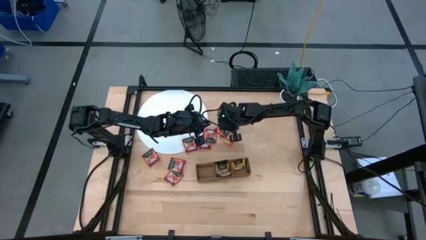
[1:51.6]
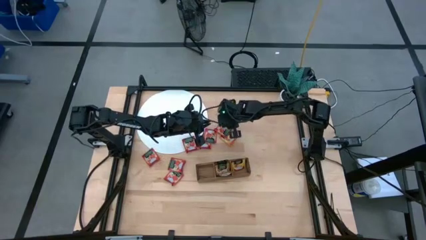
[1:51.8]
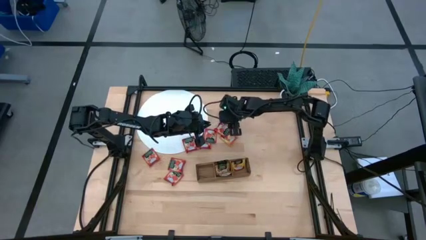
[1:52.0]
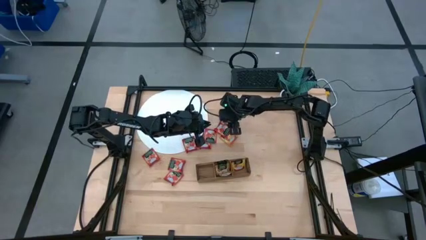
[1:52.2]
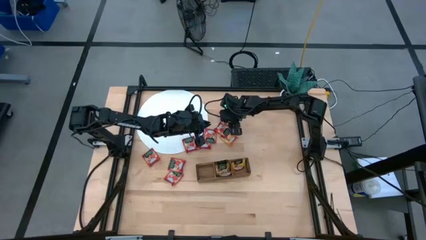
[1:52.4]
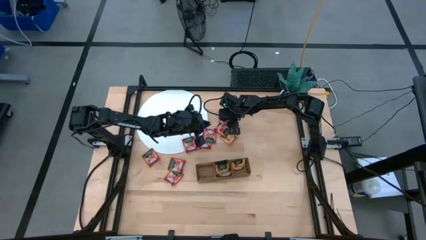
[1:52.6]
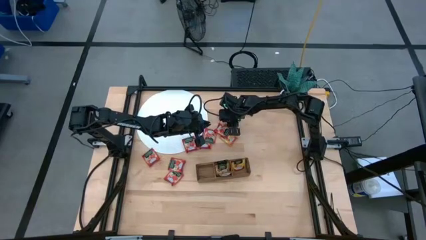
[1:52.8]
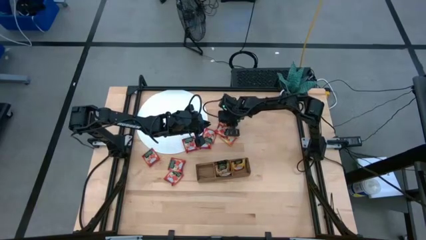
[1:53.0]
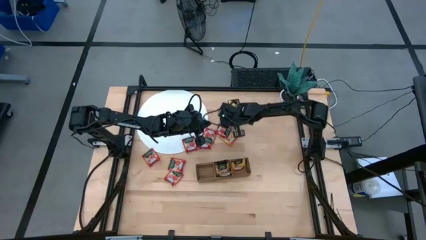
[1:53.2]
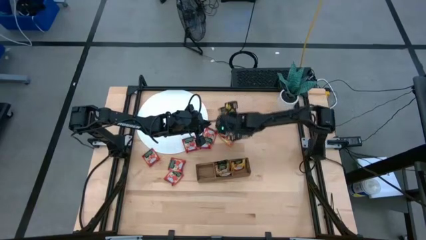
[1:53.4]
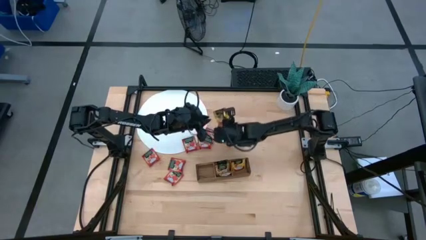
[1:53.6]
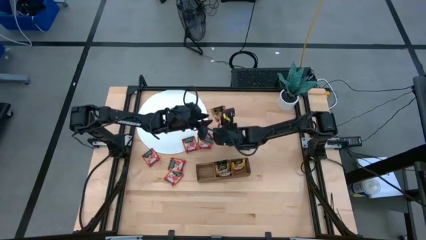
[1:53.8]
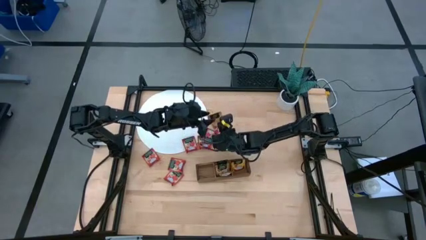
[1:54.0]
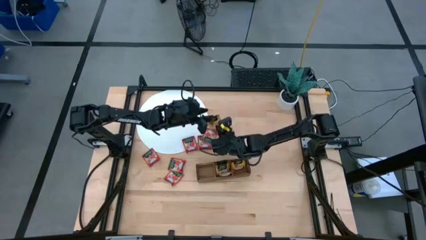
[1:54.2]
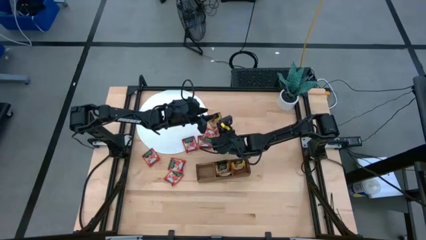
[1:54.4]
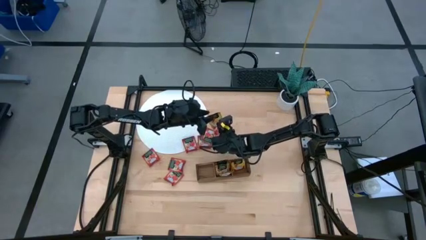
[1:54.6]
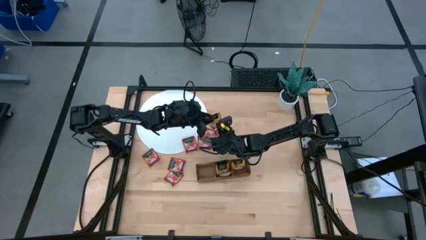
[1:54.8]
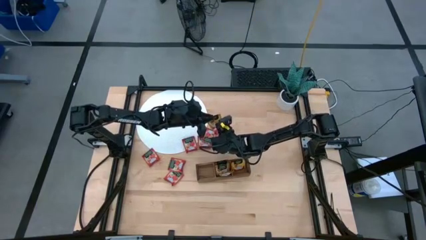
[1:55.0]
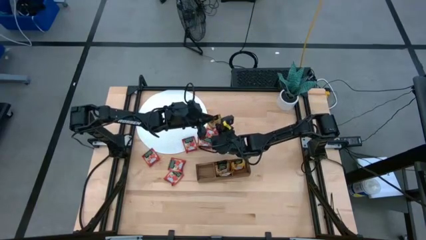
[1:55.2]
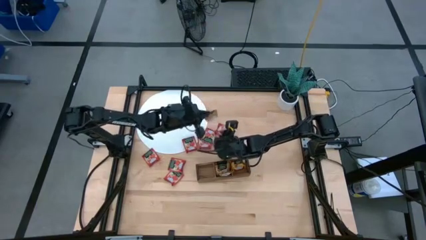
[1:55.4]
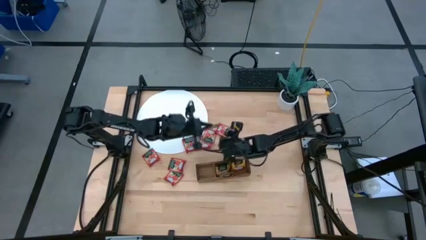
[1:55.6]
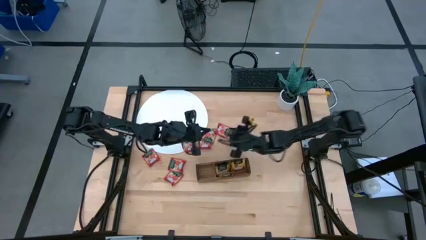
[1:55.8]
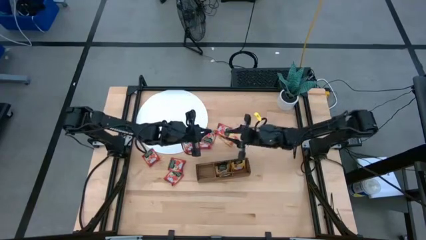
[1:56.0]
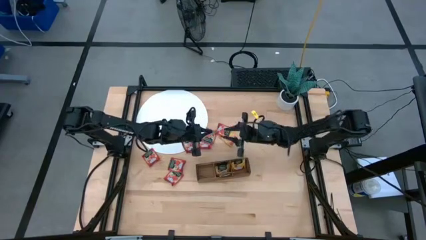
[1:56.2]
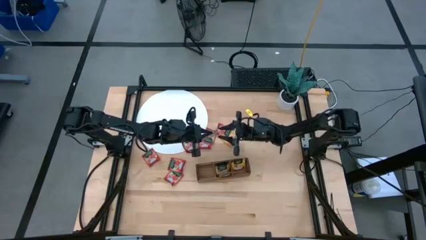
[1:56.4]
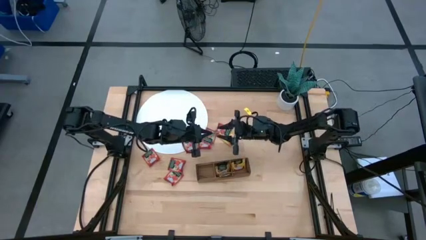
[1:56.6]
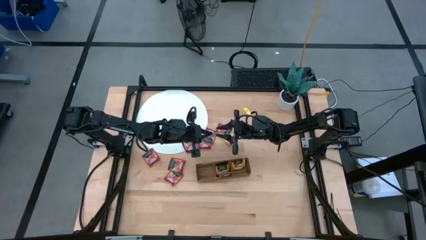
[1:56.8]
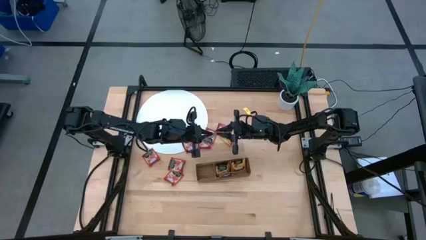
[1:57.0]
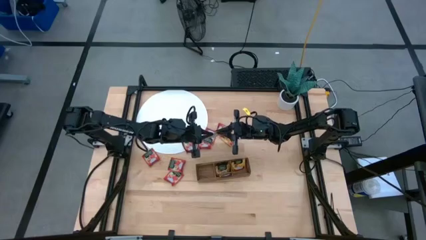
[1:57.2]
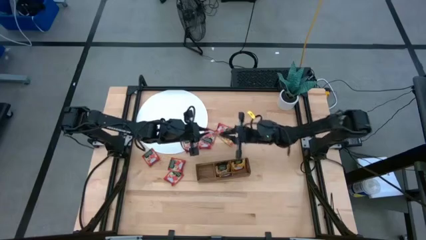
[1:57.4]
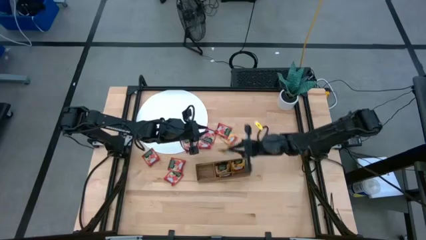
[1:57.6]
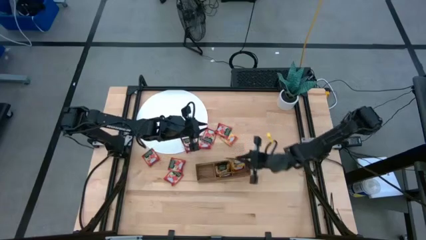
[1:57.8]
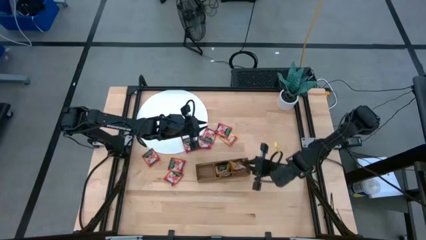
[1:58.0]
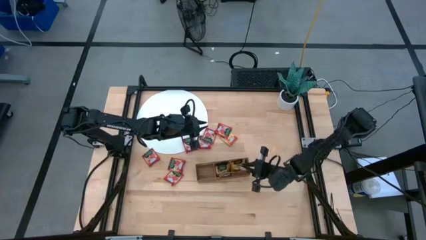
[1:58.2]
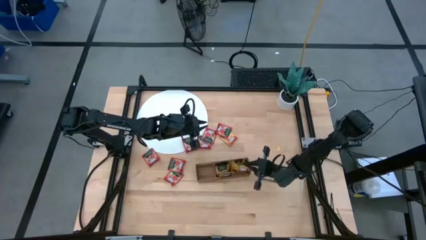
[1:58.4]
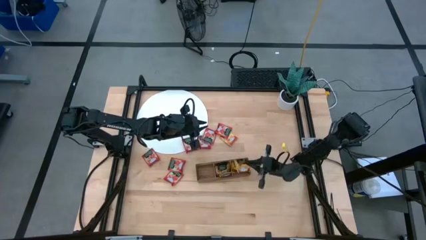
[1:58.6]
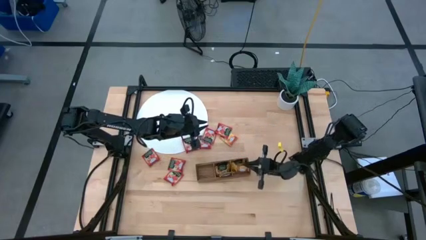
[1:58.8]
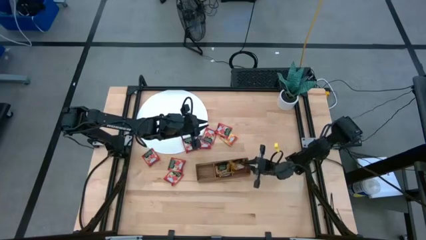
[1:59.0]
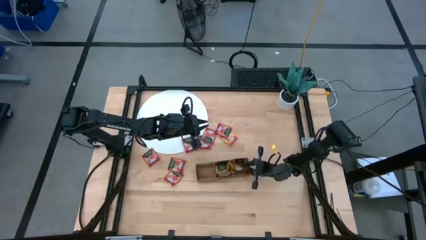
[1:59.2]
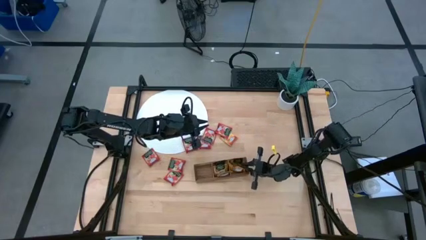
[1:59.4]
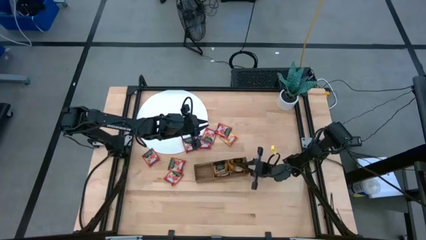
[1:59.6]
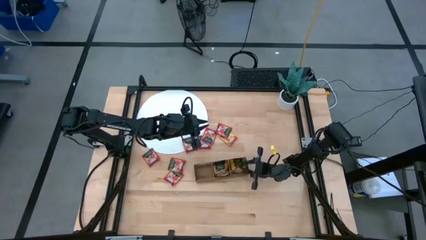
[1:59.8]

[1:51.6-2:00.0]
Task: Pick & Place Tea
Put the top yellow tea bag into the right section of the wooden organizer

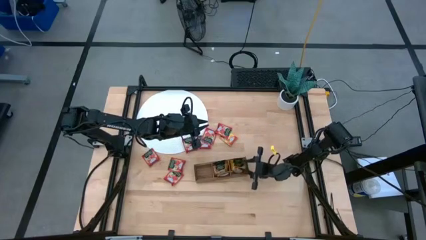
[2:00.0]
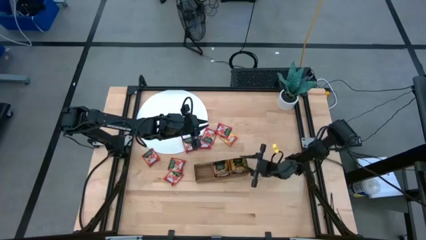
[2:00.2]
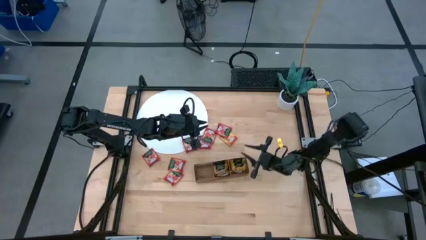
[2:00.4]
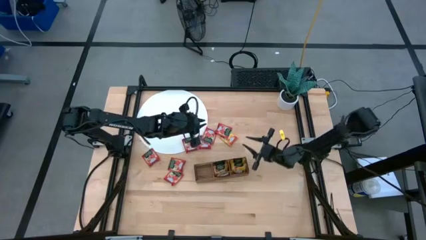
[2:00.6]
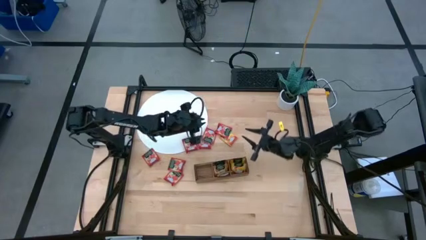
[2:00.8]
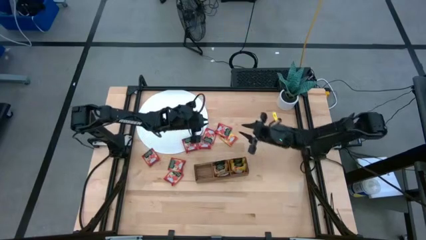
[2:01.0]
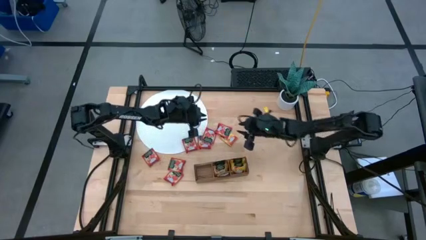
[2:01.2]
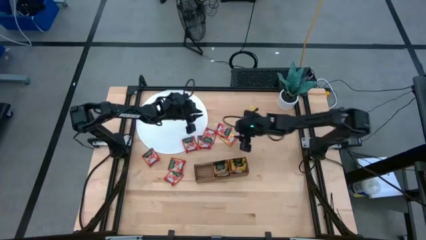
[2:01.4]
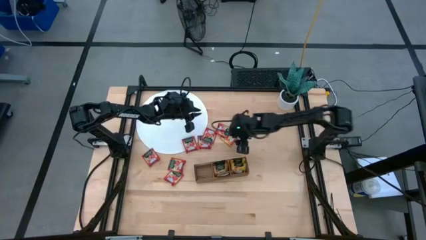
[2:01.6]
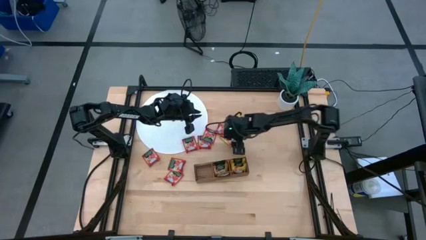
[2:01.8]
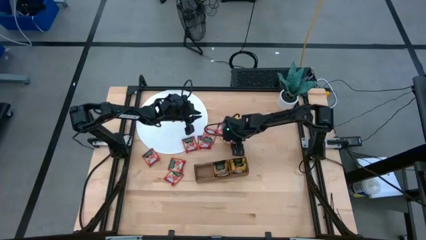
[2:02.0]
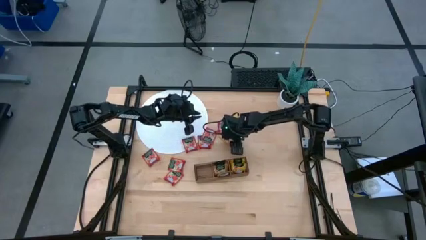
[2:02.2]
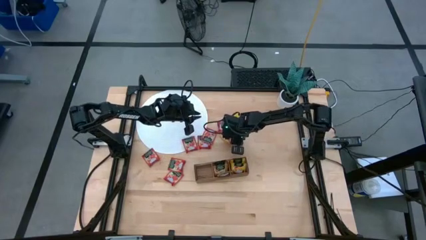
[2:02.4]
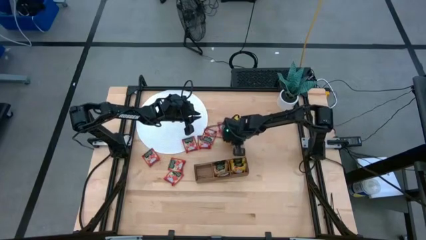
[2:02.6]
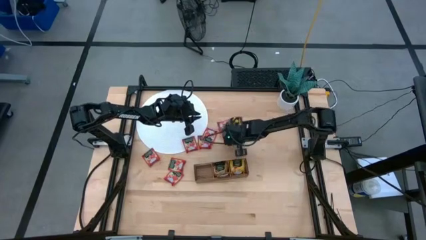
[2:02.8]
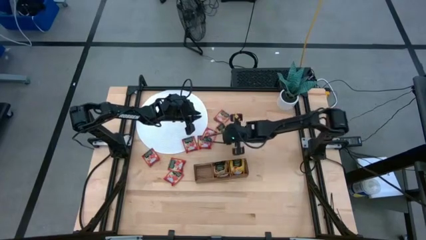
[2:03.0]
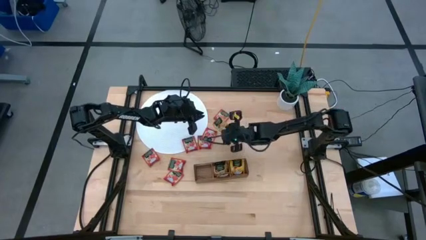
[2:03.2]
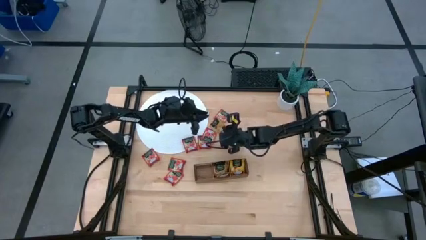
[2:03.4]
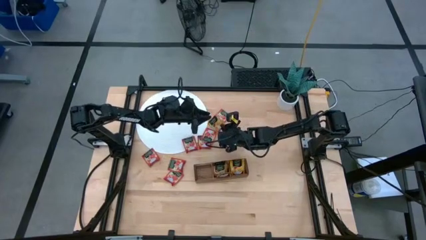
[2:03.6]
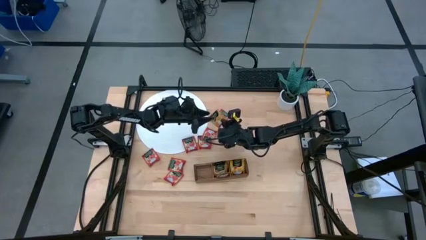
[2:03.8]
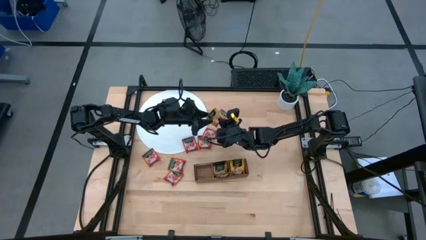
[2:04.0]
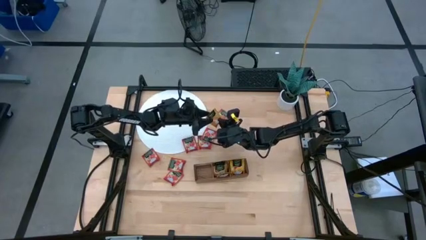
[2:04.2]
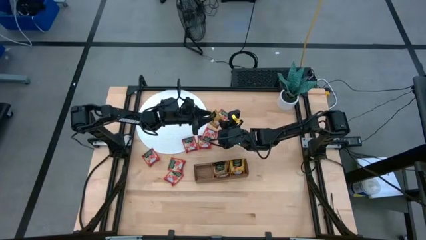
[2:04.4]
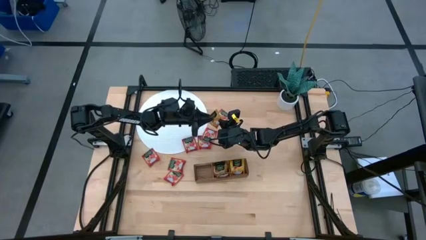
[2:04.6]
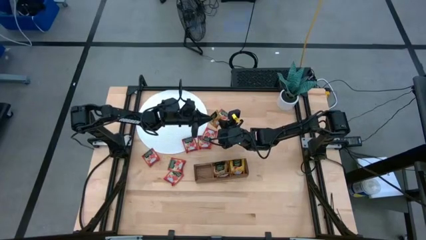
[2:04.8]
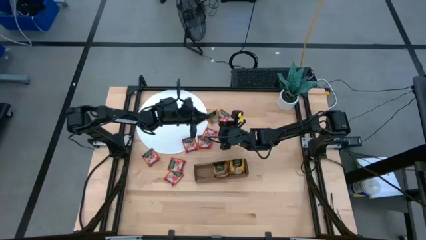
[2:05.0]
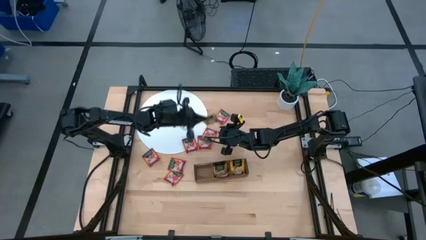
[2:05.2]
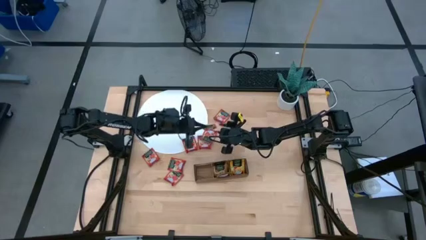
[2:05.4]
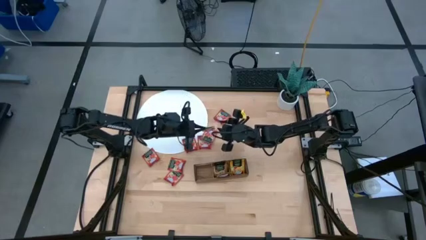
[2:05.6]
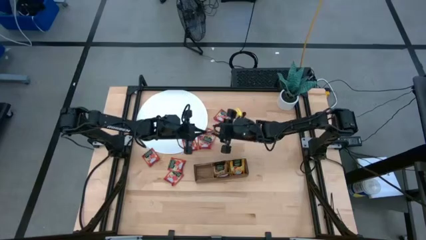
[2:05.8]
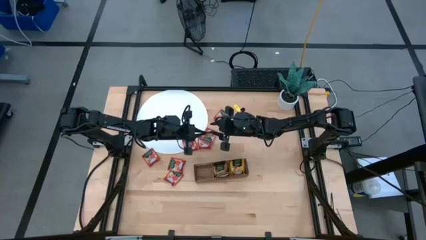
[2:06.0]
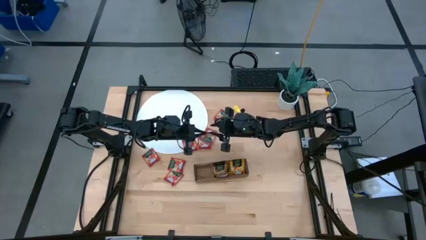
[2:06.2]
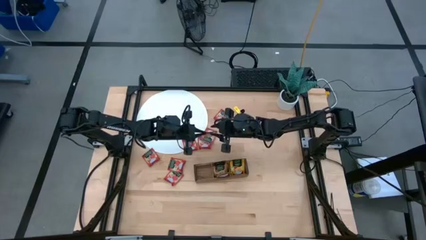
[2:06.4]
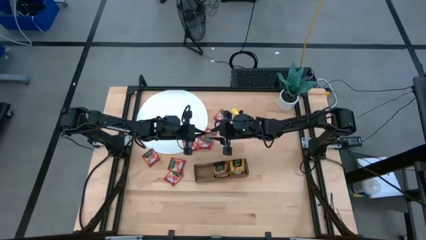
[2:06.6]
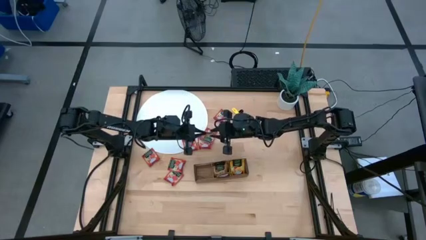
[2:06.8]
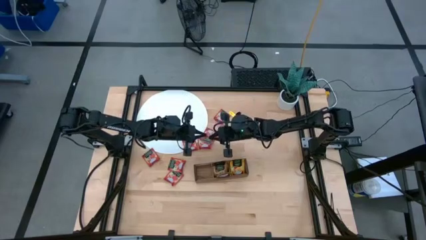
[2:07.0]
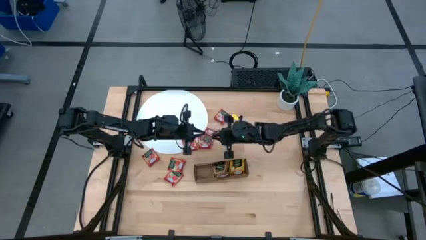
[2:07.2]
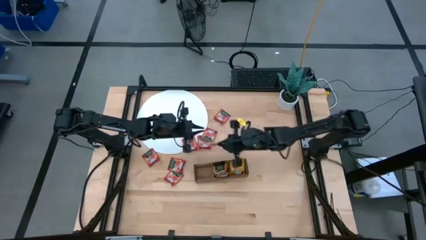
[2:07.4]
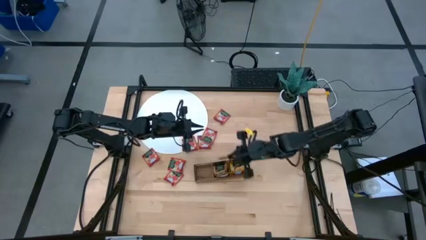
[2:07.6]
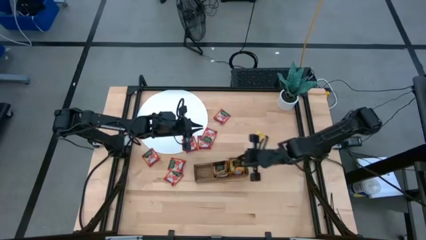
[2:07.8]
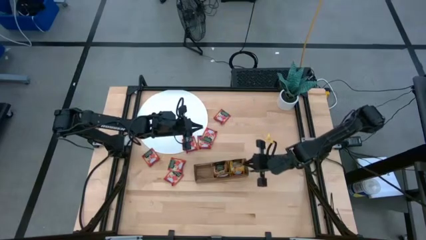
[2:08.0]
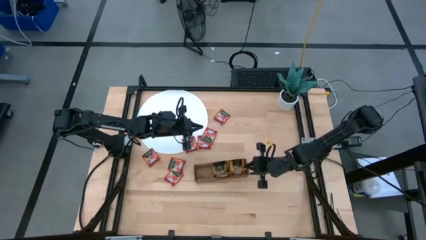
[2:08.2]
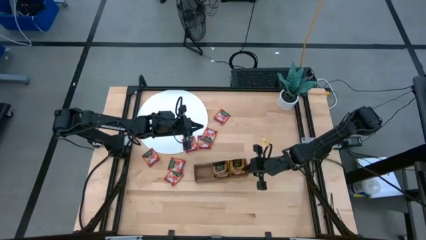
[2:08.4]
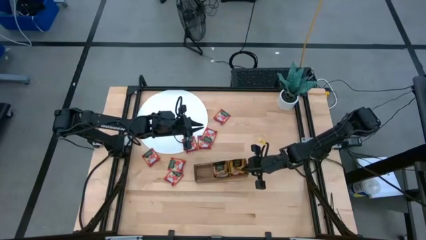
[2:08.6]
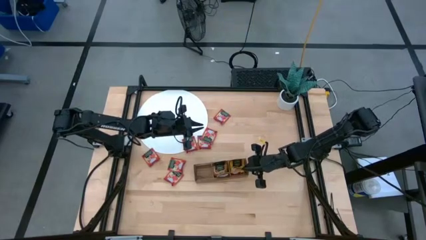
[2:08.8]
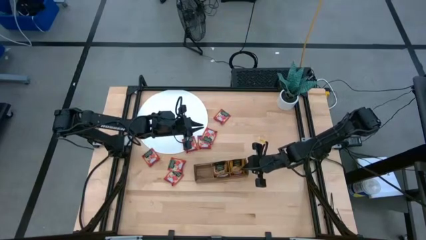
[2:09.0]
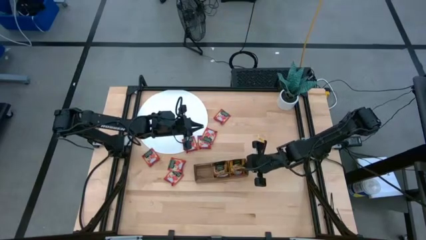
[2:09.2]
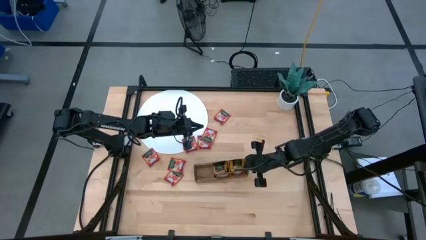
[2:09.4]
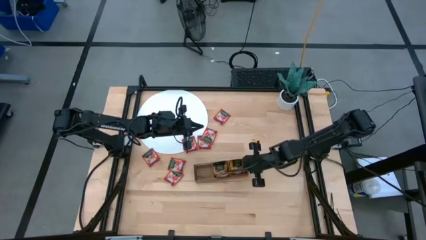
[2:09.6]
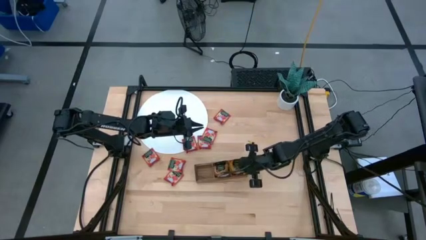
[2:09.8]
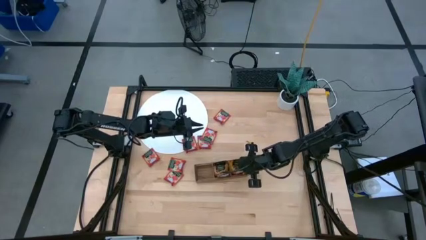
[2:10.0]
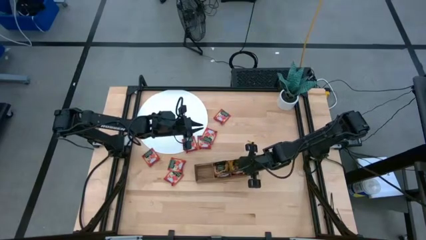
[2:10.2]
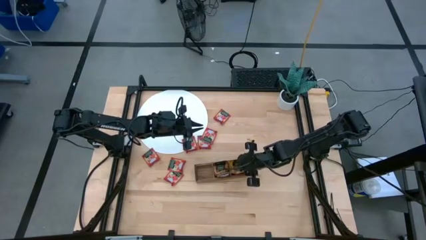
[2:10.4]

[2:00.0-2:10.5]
Put the yellow tea bag into the right section of the wooden organizer
